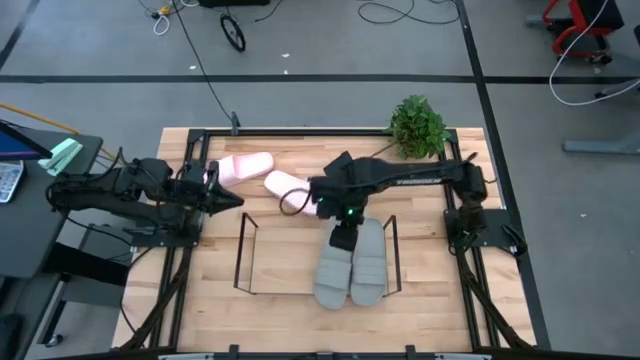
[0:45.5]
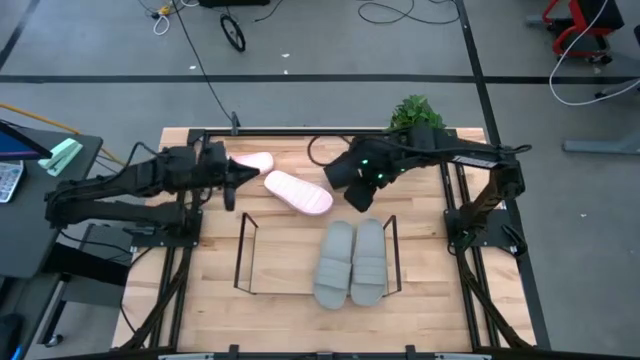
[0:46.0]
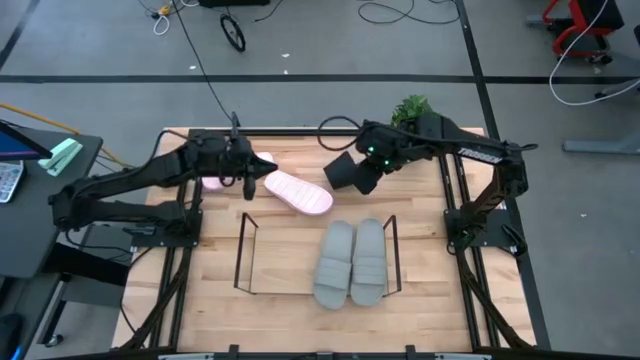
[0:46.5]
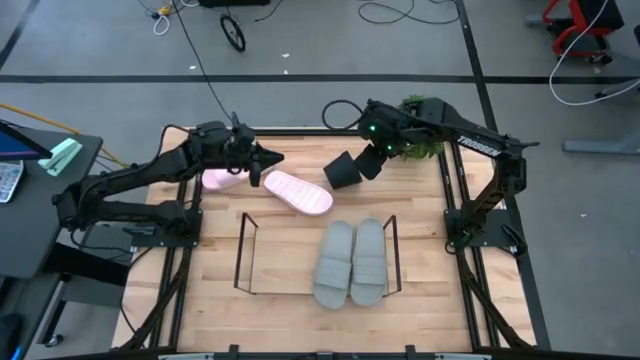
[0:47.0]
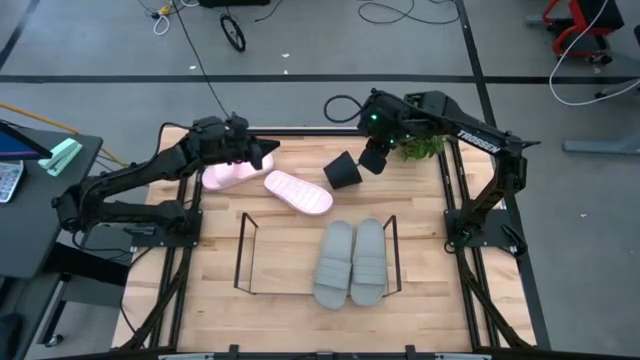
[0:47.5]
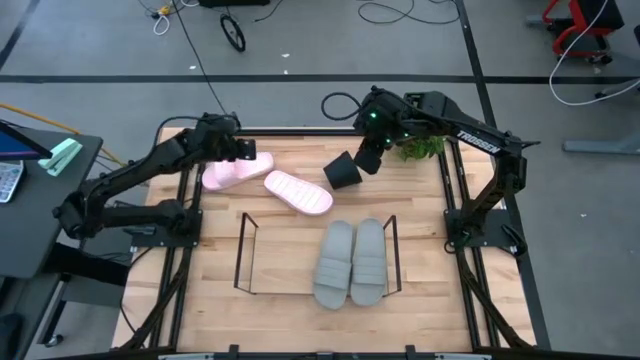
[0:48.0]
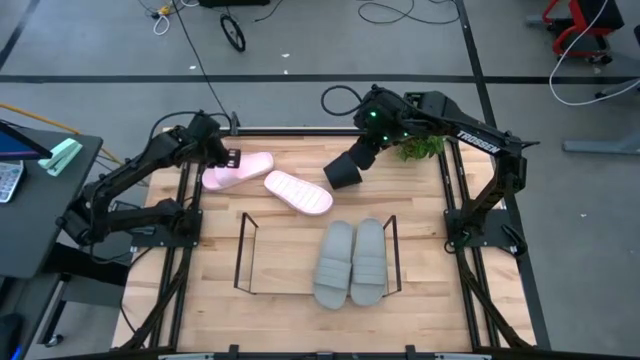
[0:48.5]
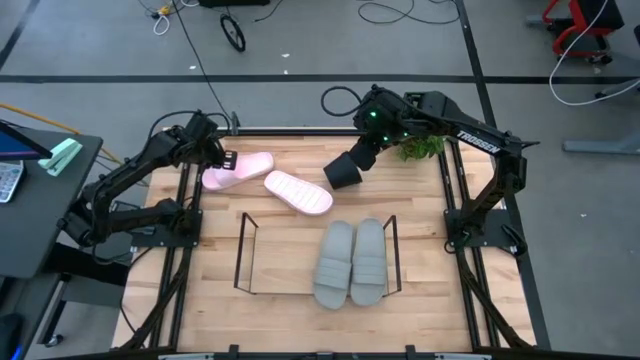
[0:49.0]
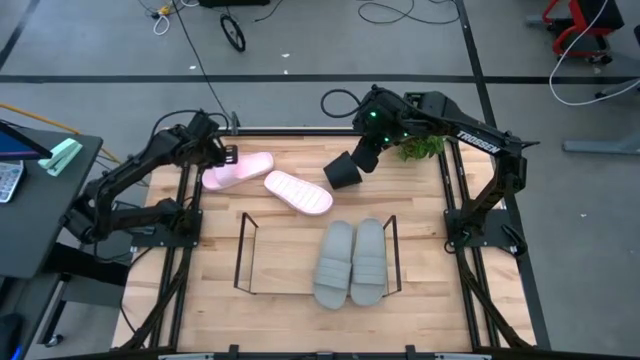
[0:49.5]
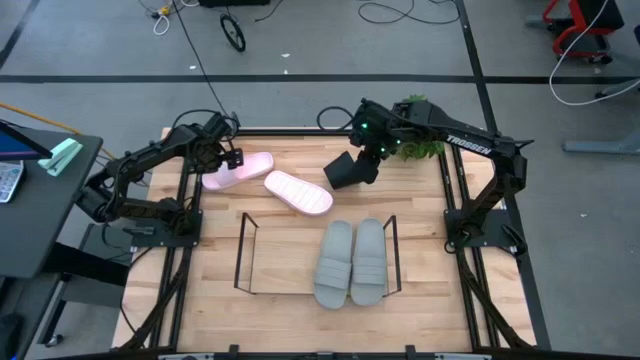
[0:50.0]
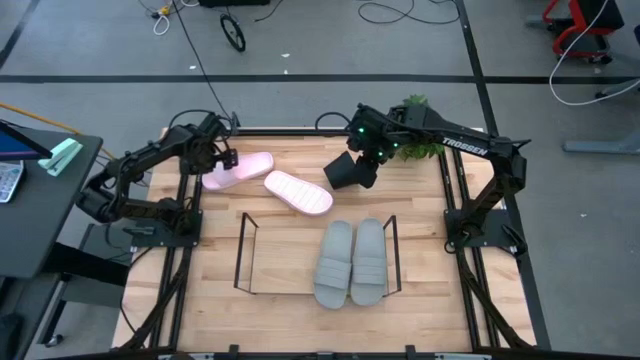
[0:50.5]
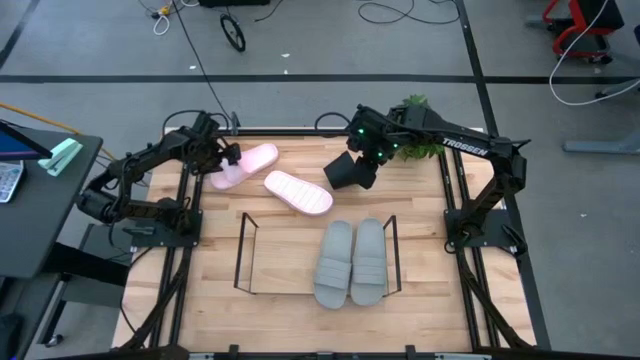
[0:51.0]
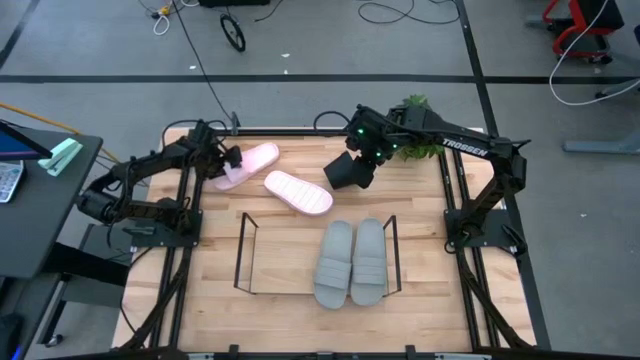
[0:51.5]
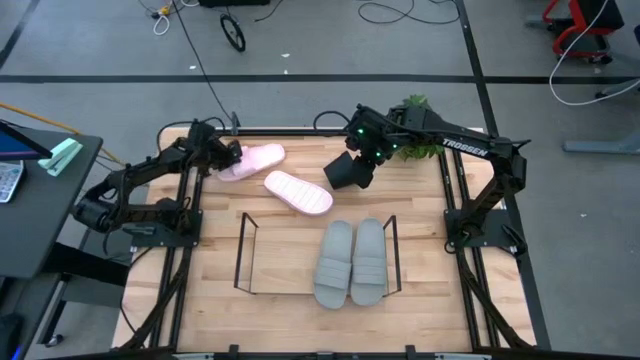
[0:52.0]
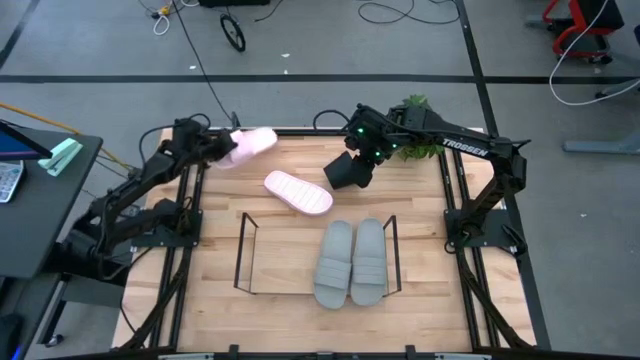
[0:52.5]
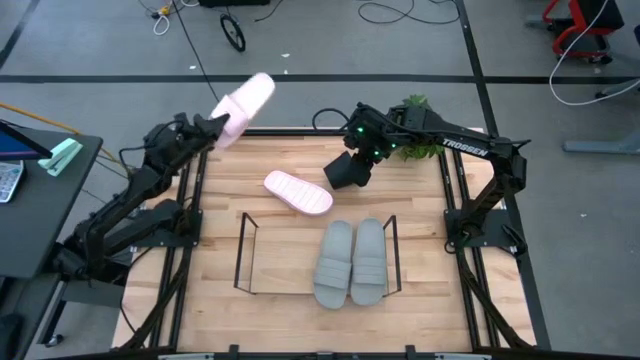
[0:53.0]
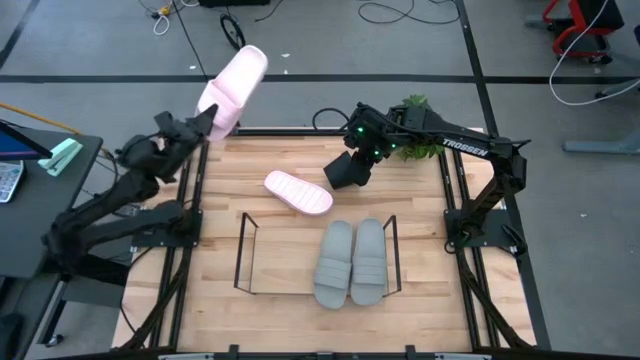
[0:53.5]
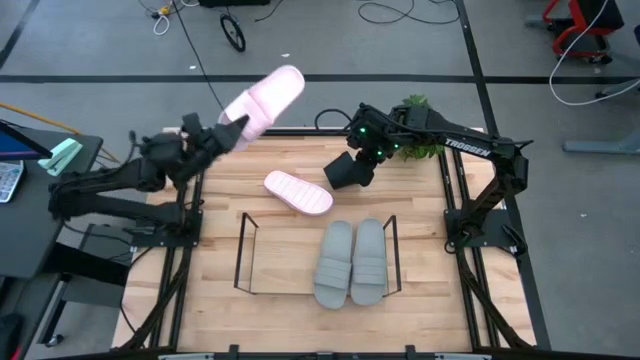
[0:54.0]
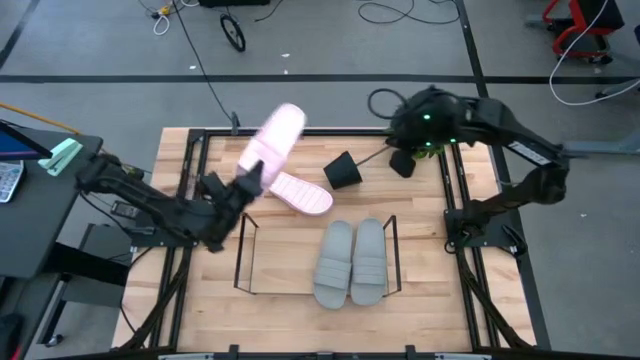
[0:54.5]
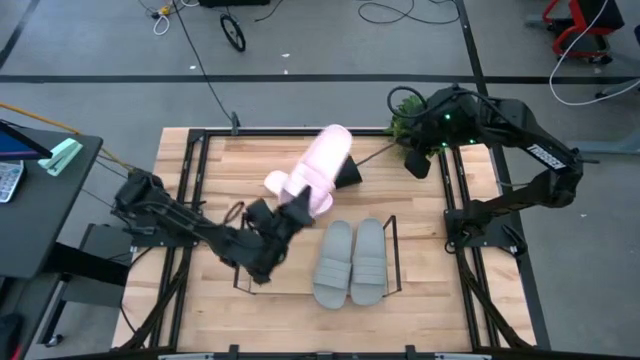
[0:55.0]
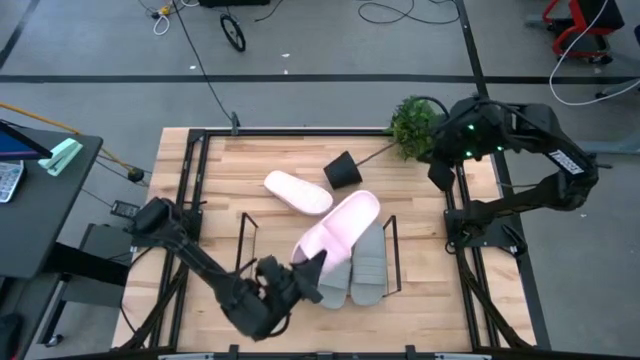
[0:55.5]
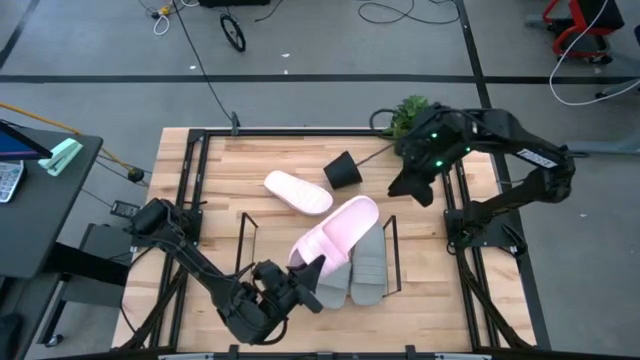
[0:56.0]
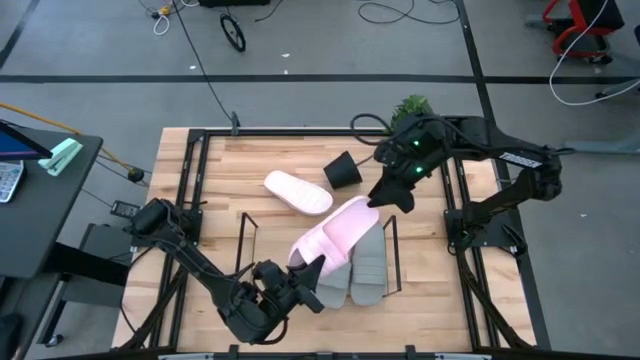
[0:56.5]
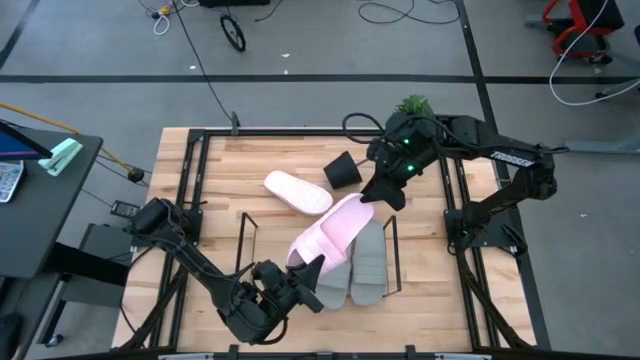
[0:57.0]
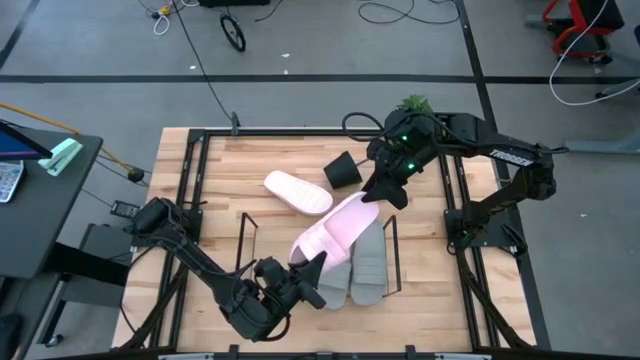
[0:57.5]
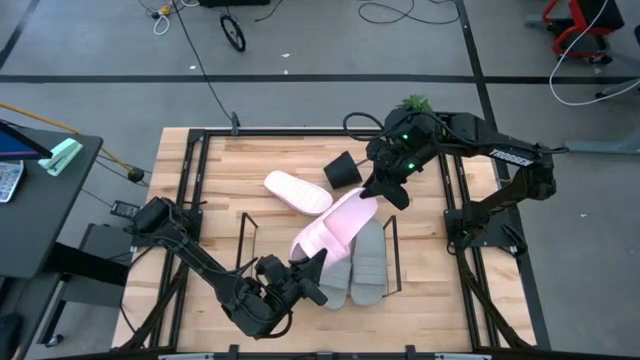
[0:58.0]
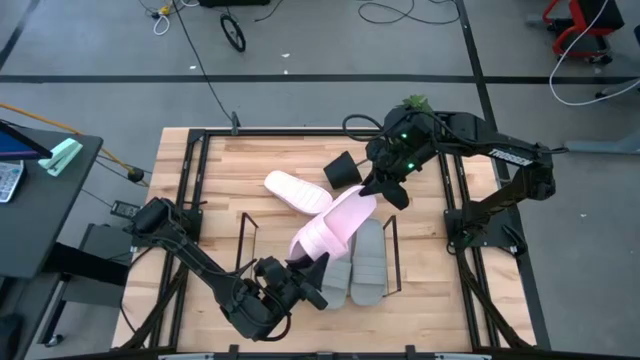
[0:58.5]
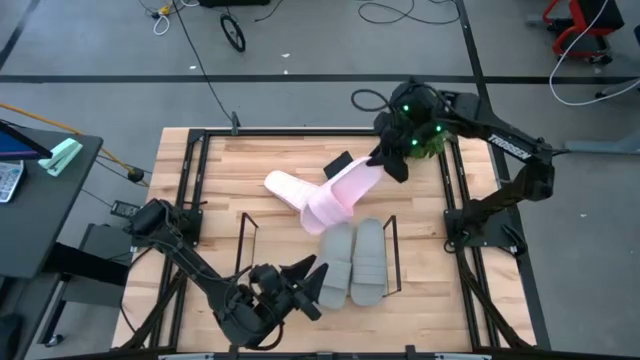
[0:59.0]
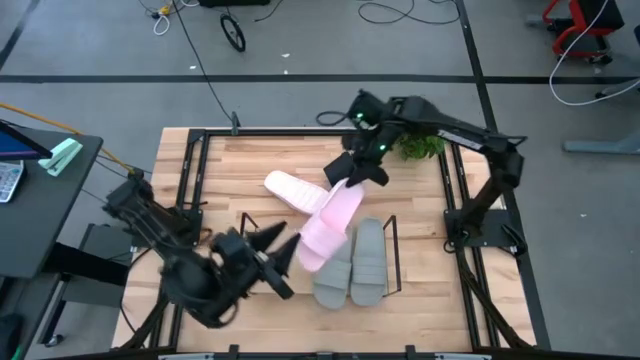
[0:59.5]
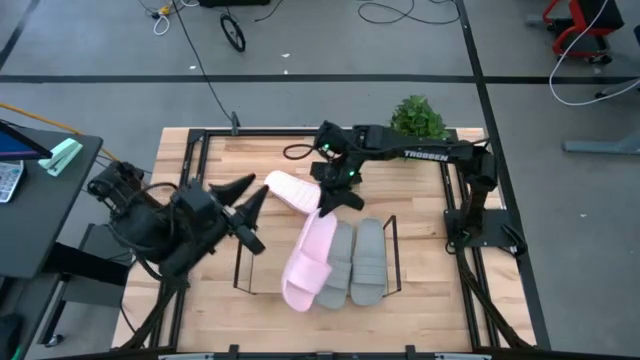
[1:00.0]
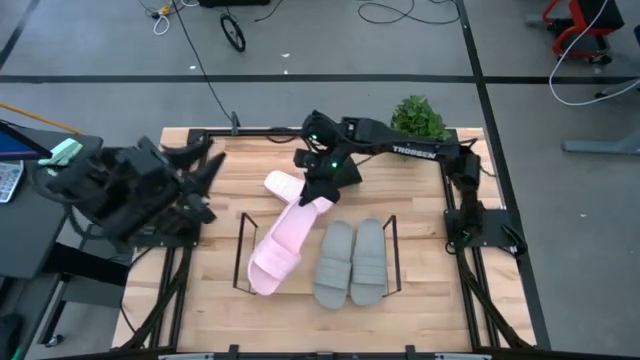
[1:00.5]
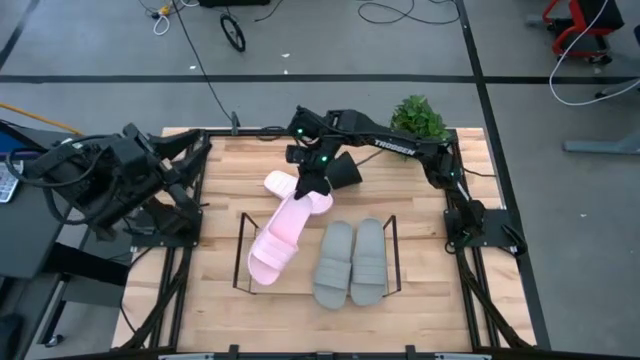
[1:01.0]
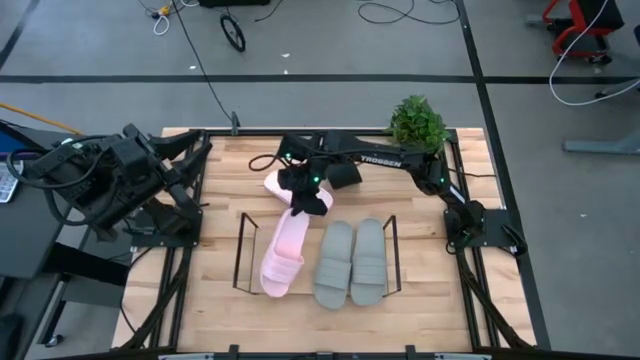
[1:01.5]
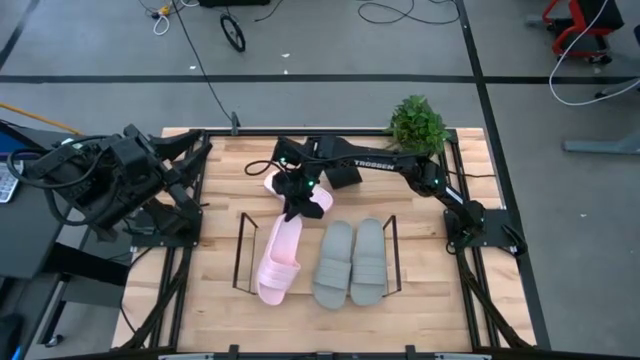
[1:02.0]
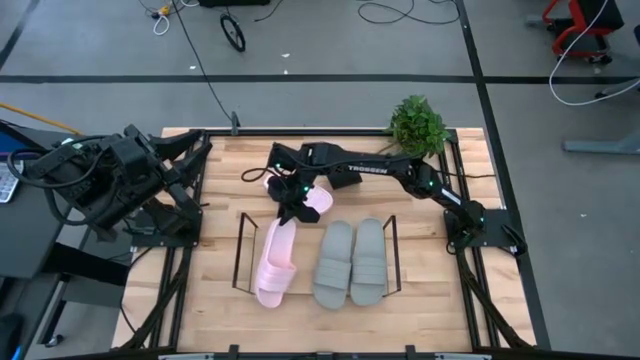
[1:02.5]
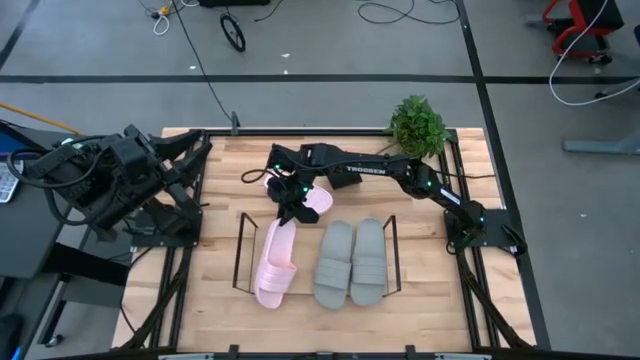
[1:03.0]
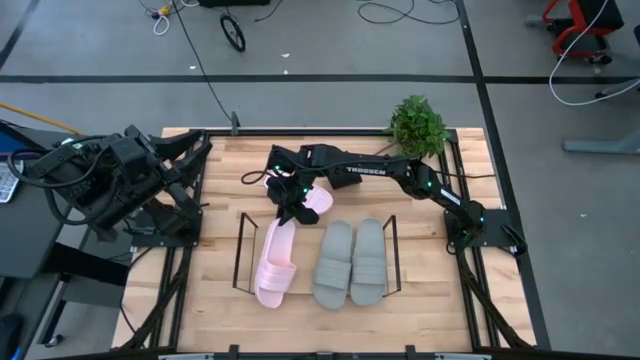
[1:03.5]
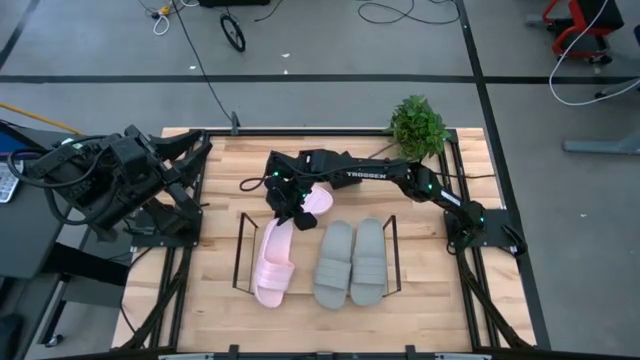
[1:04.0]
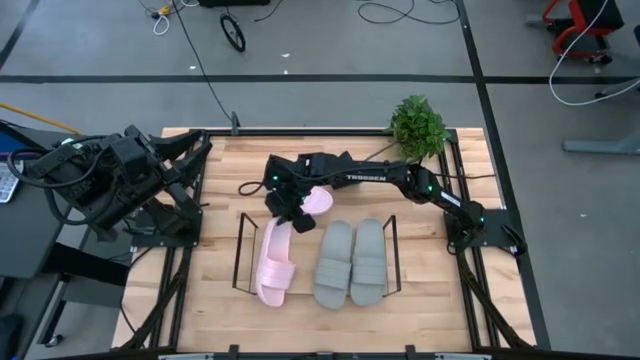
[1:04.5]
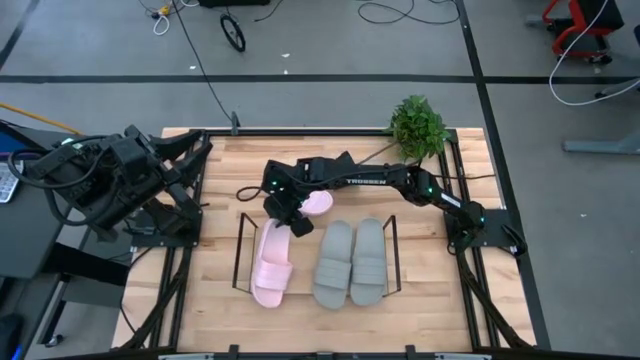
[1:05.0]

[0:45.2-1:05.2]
Task: Pick and place slides into the shelf
Put the left pink slipper on the shelf

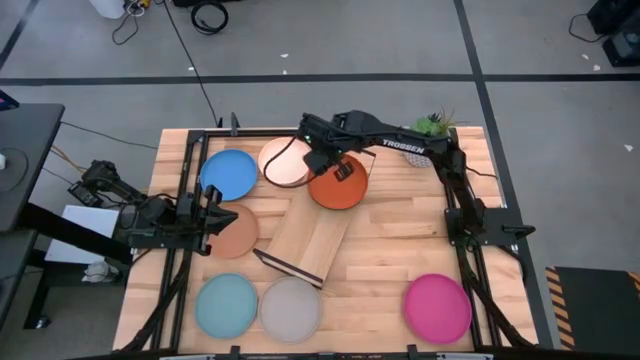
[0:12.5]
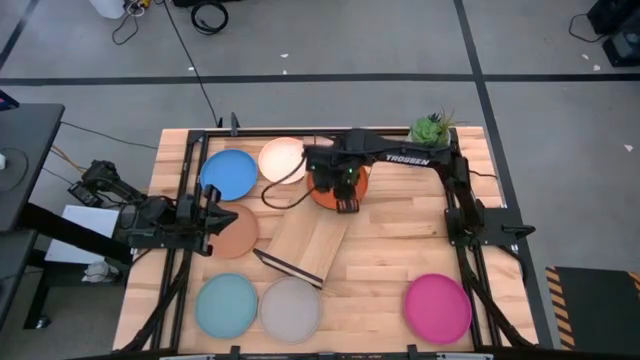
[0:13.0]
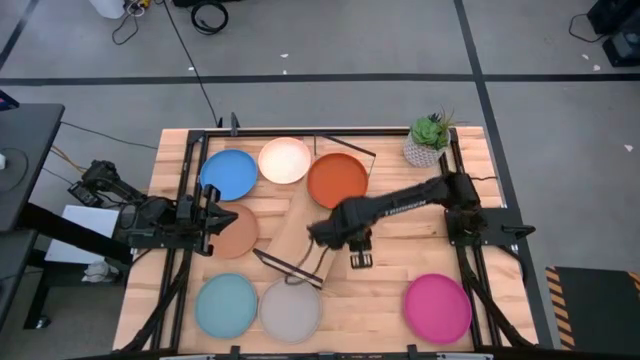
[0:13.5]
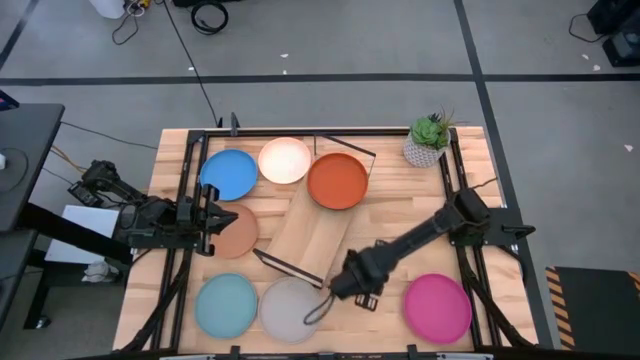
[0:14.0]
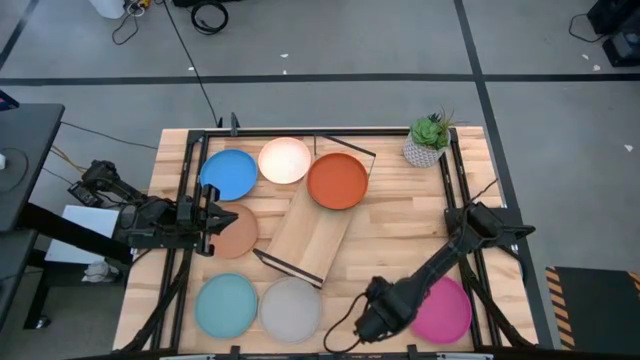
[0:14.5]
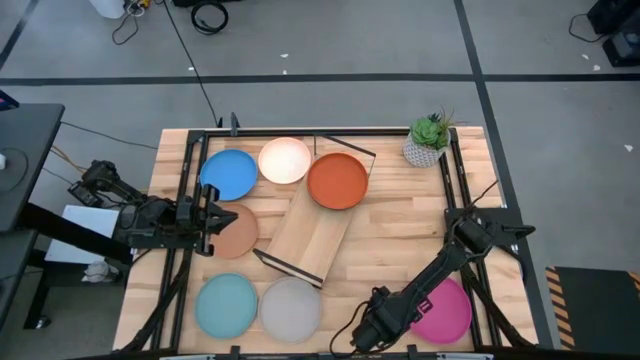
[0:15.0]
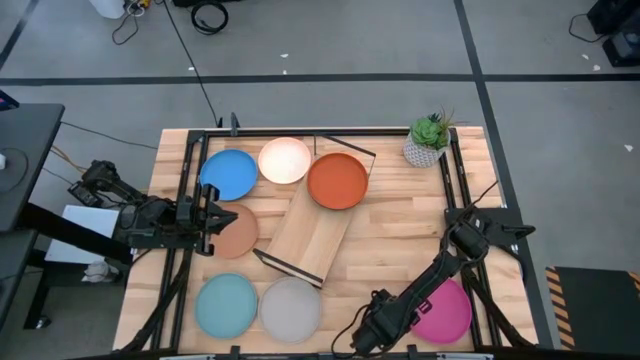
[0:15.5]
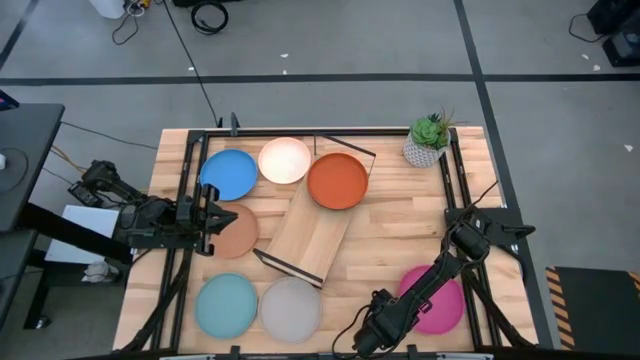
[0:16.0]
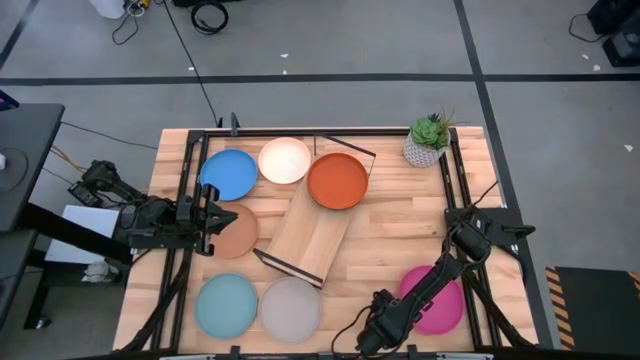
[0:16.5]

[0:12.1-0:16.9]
Task: Place and stack plates onto a shelf
Stack the pink plate on top of the orange plate on the shelf
